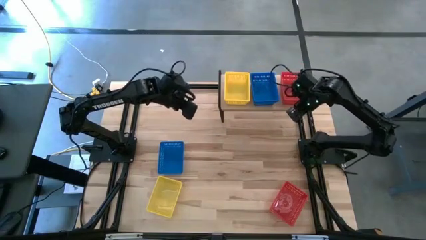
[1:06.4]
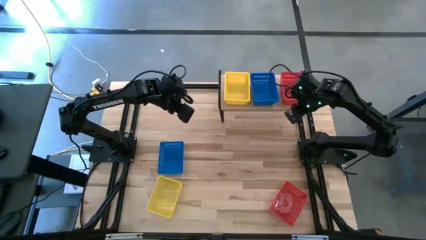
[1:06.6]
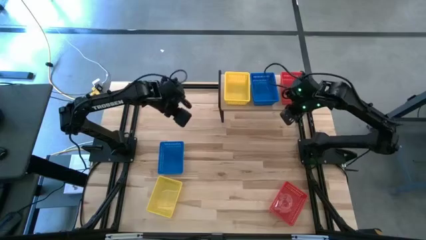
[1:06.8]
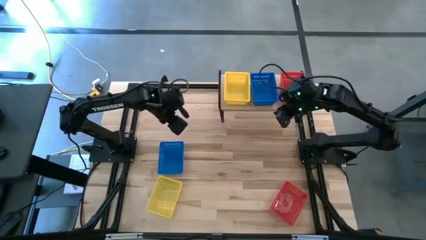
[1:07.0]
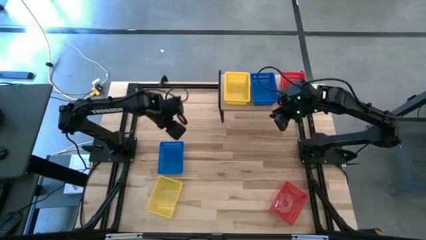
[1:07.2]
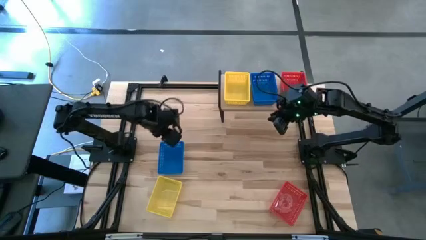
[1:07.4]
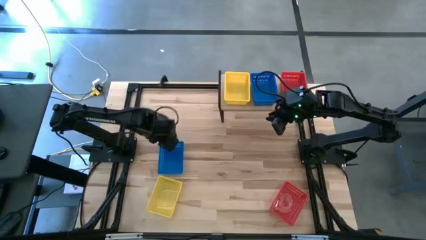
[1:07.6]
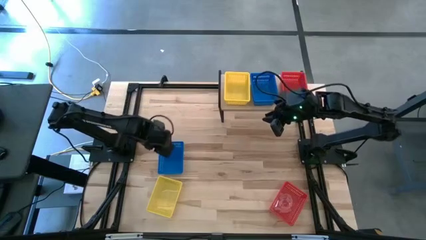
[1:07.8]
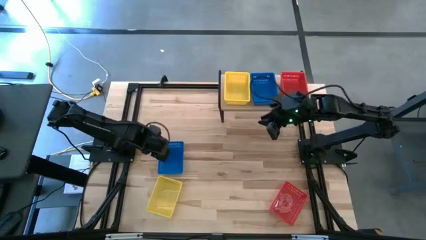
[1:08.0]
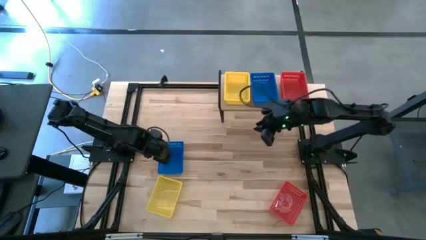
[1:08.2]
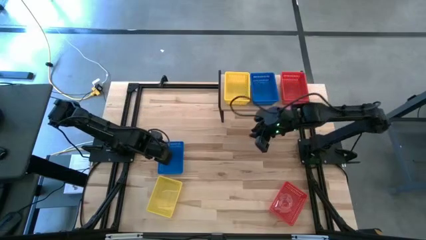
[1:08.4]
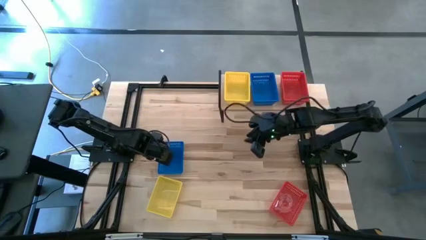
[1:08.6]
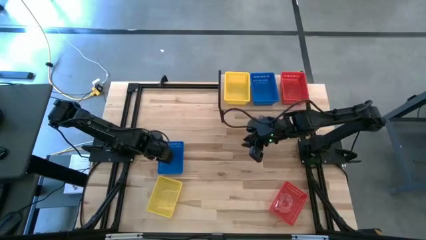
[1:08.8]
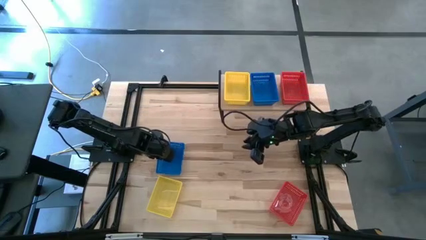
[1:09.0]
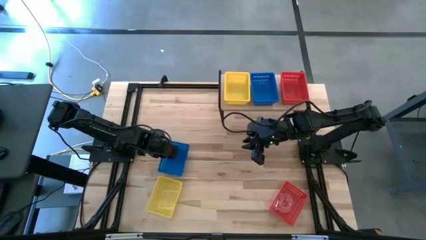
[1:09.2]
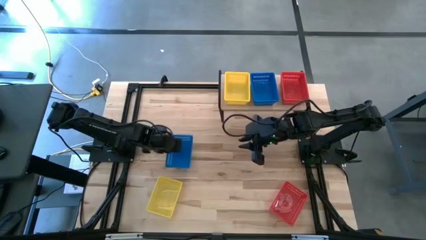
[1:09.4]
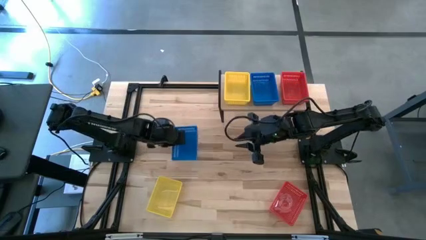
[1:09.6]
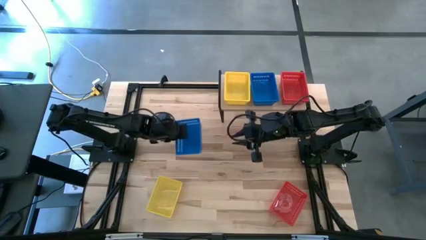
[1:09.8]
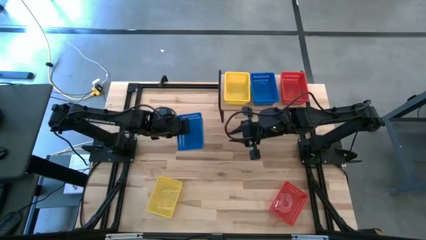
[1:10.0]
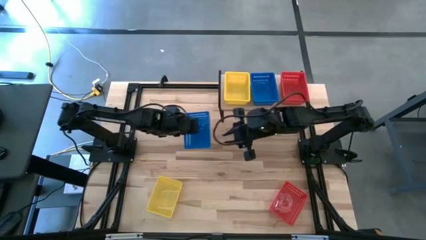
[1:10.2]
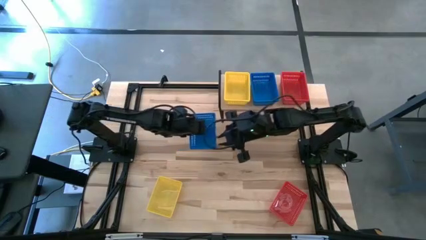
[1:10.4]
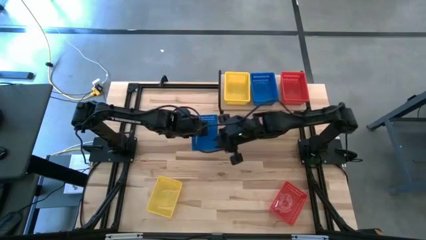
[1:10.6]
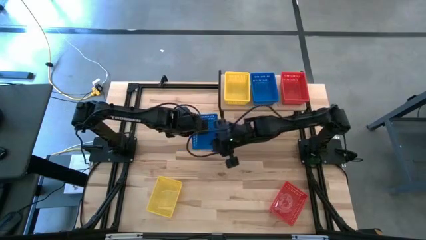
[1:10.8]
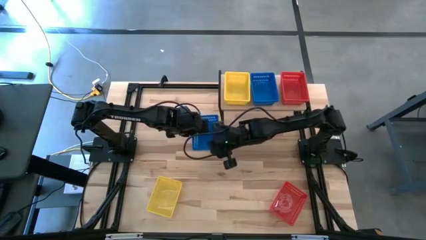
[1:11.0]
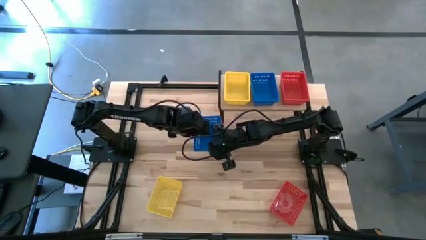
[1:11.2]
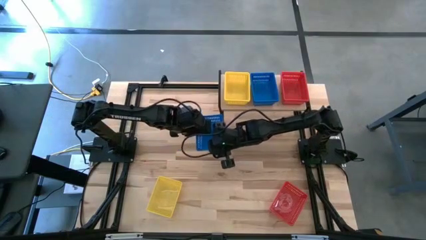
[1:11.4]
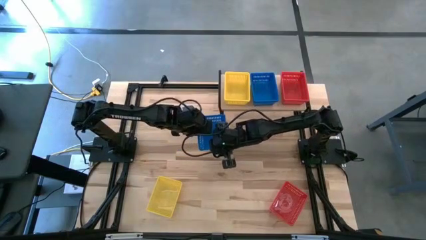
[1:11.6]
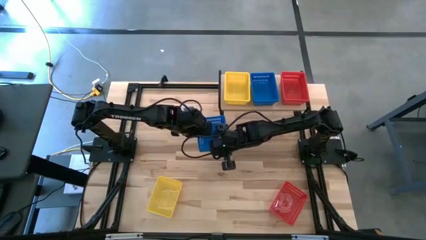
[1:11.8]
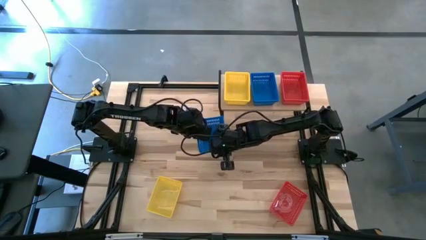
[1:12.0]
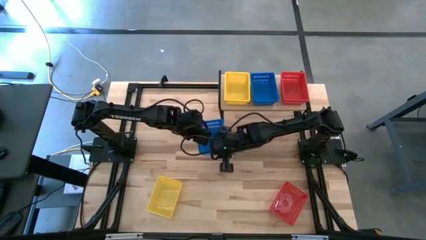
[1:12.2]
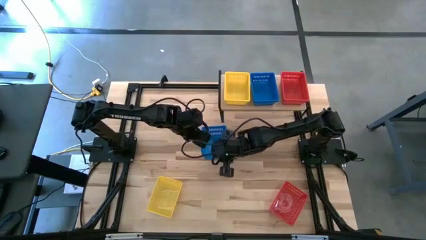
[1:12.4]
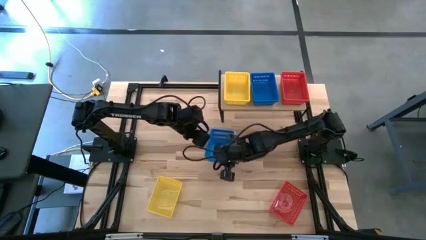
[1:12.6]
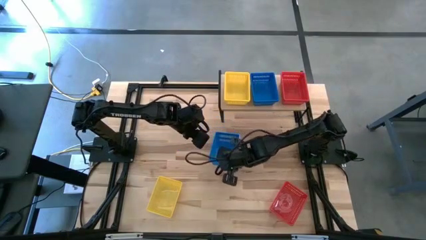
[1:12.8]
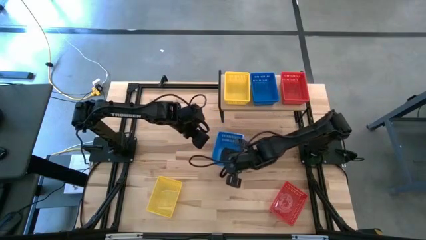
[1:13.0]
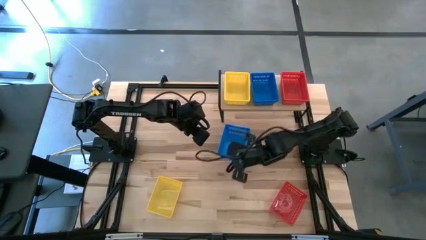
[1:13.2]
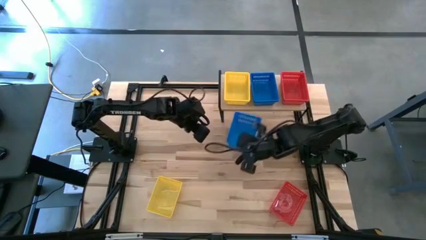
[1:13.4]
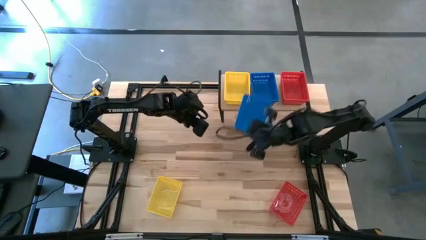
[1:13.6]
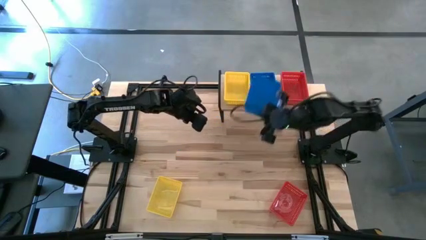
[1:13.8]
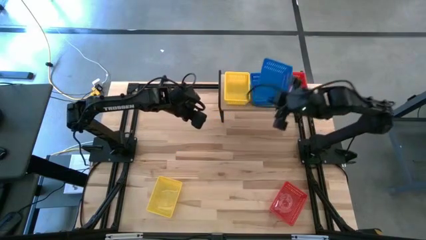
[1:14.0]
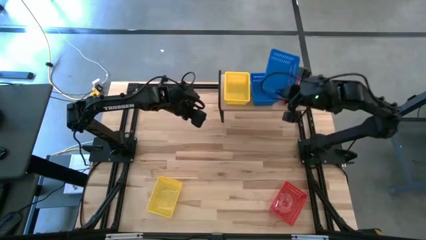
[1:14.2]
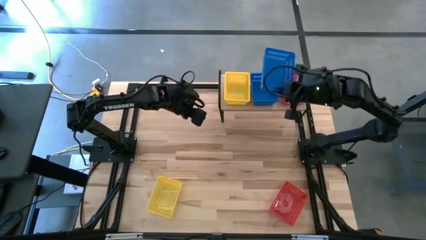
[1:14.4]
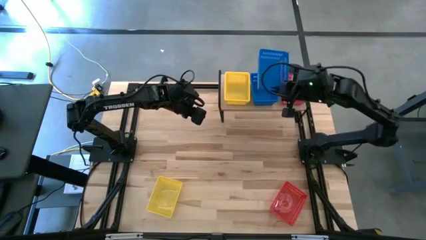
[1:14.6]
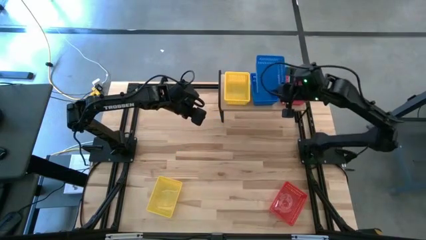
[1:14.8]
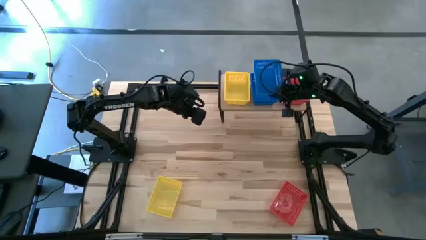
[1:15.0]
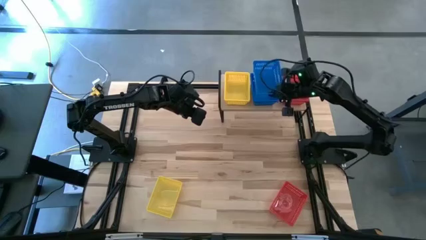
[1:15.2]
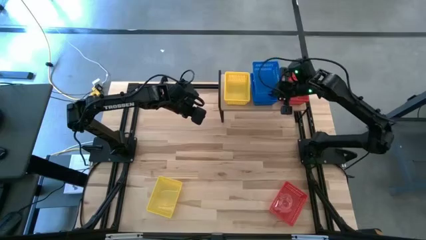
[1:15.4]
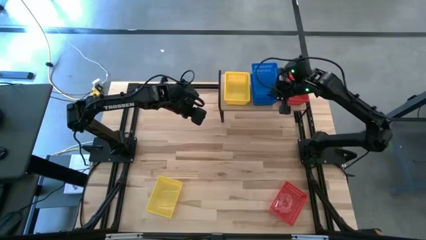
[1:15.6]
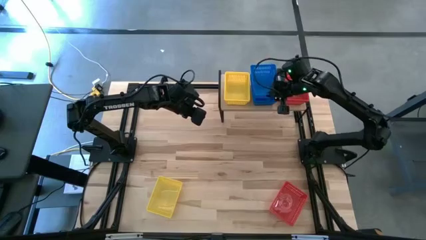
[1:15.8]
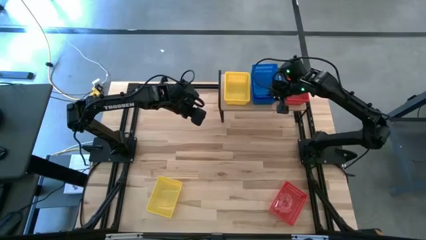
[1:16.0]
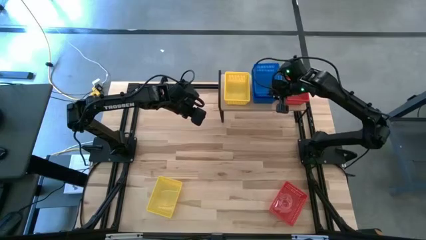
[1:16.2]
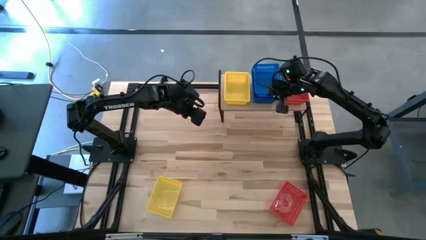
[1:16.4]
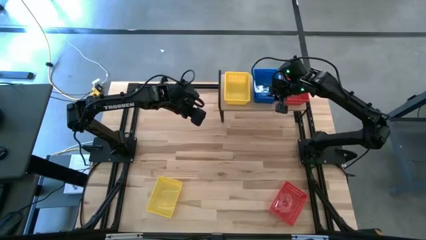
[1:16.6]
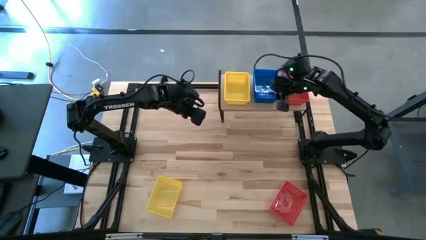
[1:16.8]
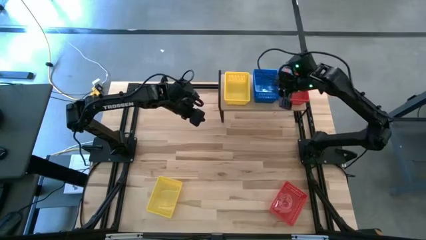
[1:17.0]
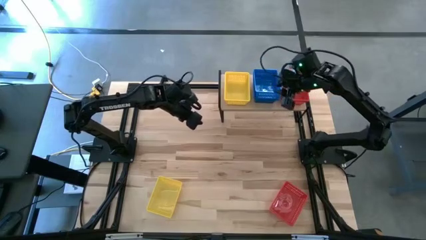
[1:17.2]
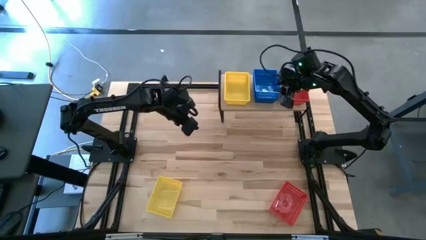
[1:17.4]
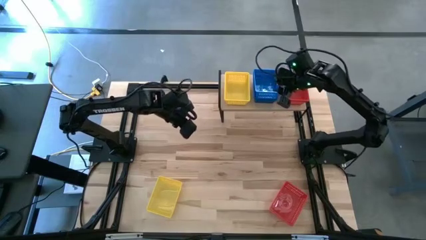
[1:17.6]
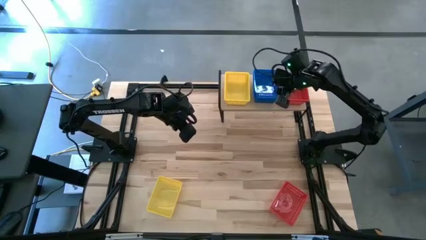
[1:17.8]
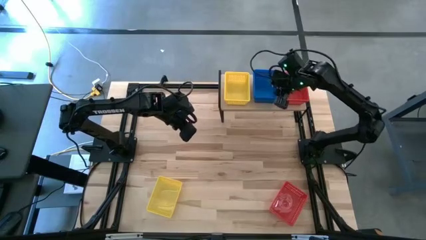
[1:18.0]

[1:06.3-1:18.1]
Task: Stack baskets on shelf by color
Stack the blue bin on top of the other blue bins on the shelf
